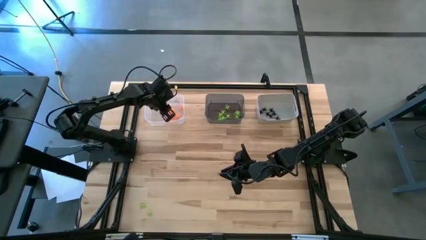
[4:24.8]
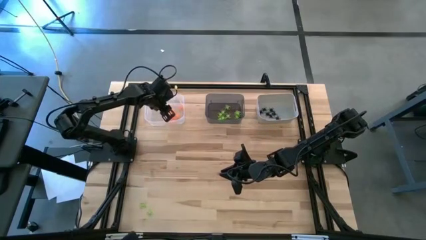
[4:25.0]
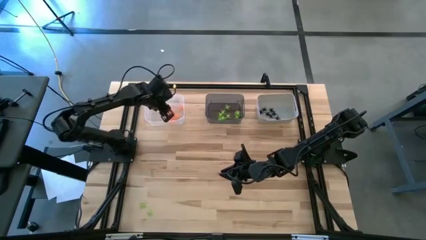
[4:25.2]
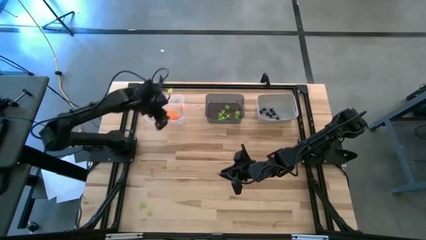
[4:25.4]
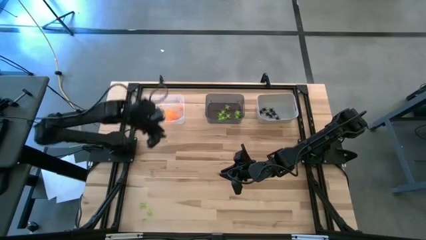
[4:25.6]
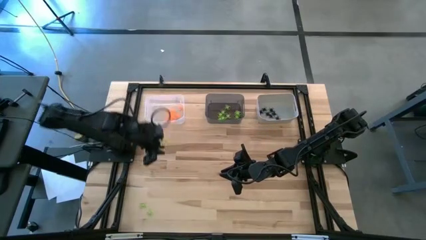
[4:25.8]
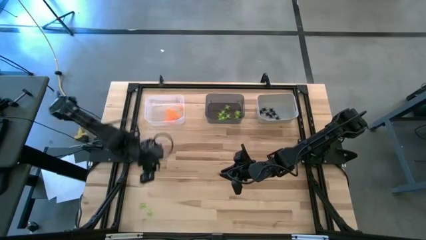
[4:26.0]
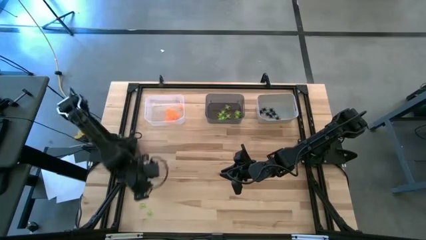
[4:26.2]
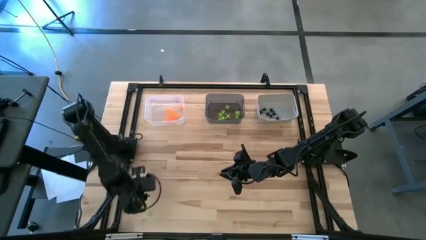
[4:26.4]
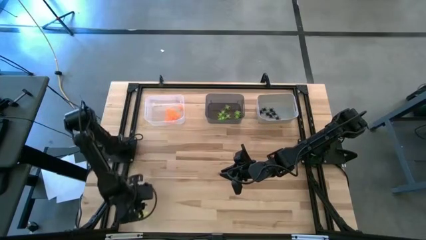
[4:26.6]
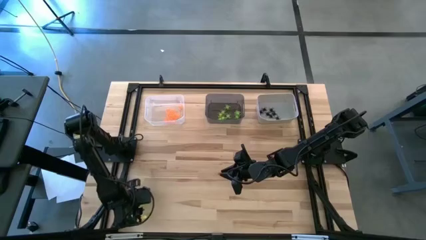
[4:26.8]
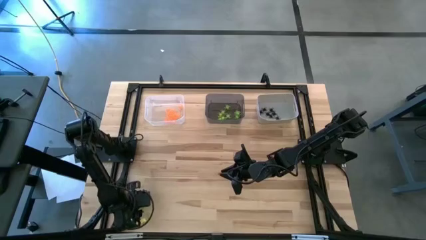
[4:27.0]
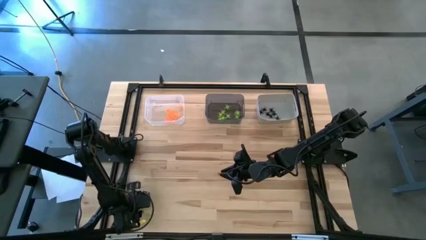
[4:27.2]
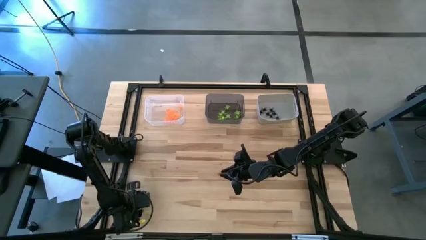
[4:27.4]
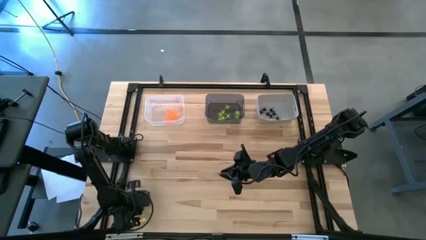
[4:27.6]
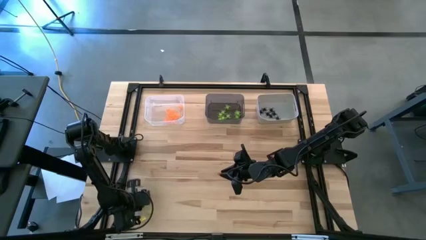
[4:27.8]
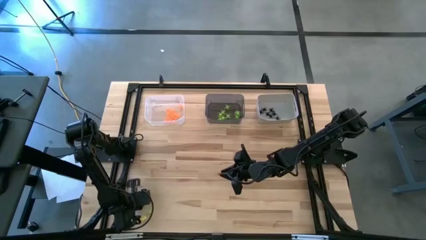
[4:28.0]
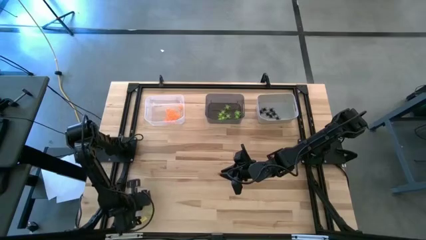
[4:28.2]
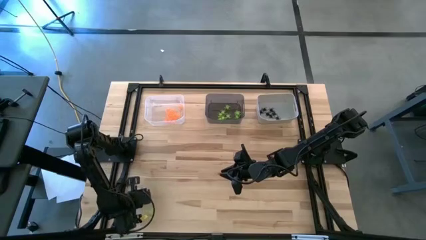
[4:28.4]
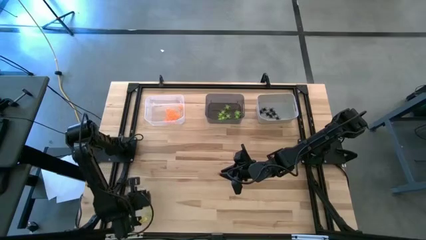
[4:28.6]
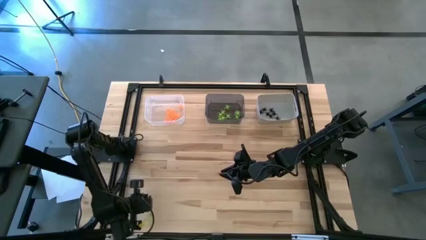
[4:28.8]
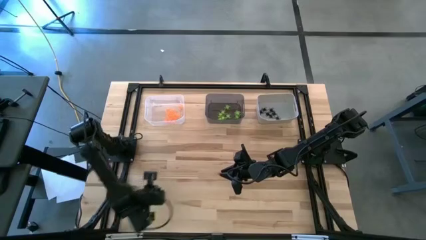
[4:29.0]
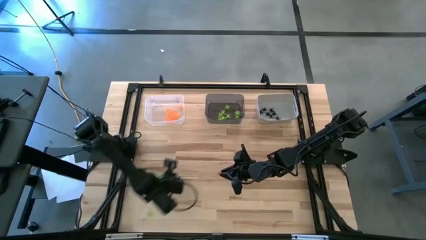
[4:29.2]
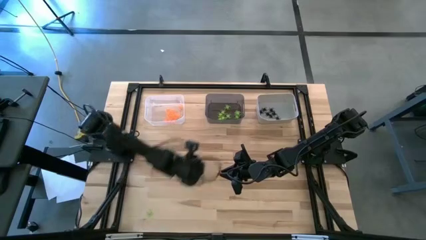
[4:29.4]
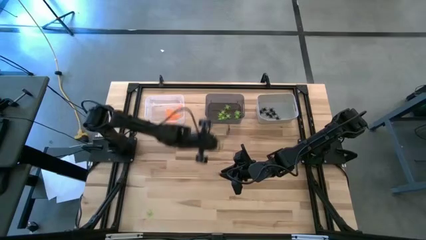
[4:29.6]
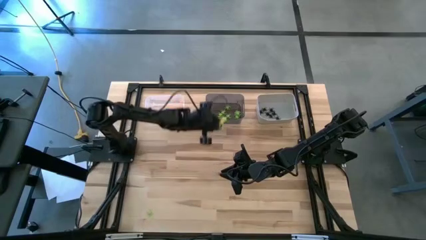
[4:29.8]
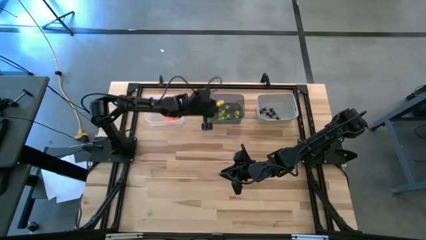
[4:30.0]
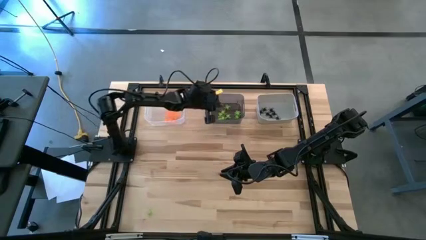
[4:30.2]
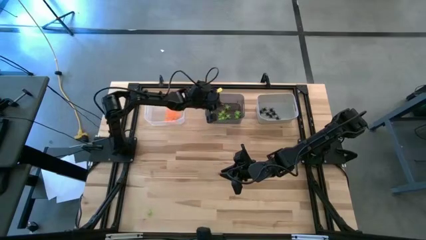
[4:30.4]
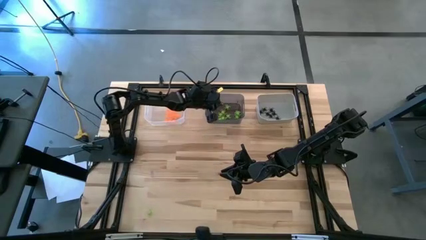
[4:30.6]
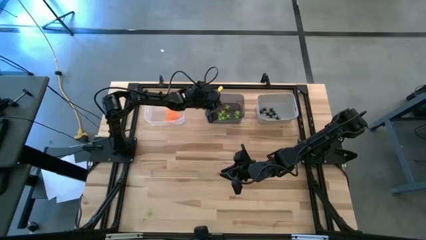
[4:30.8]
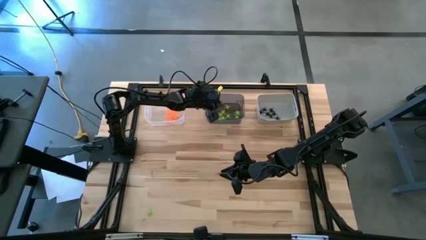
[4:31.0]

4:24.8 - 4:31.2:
Task: Sort Halloween decoration
Put the green spider toy into the black bin

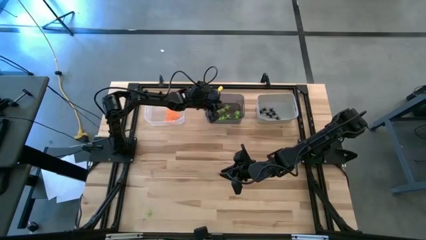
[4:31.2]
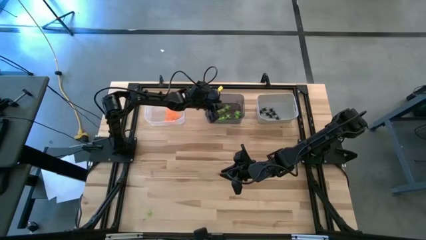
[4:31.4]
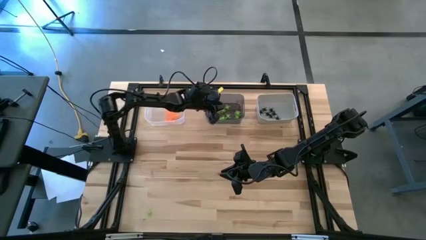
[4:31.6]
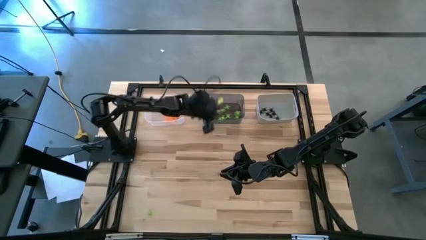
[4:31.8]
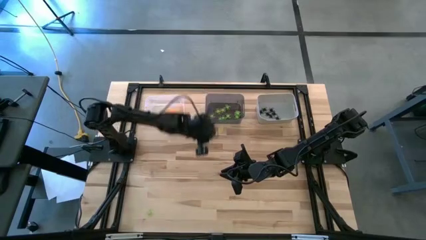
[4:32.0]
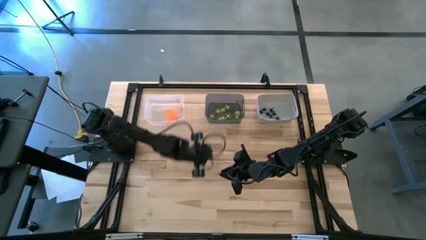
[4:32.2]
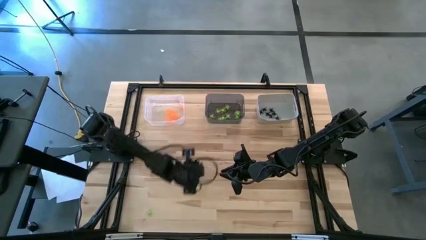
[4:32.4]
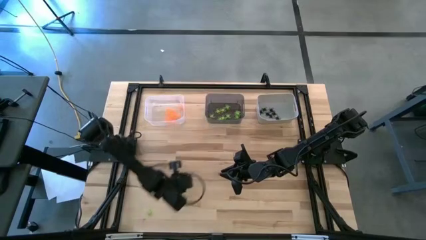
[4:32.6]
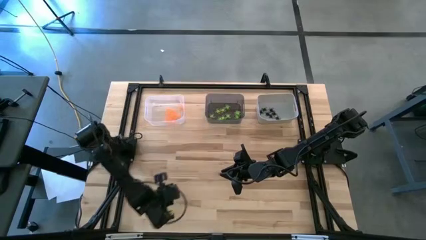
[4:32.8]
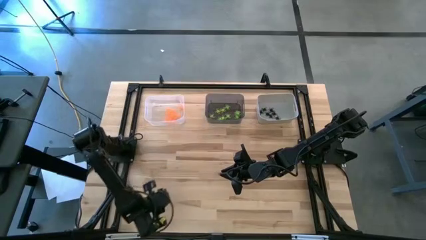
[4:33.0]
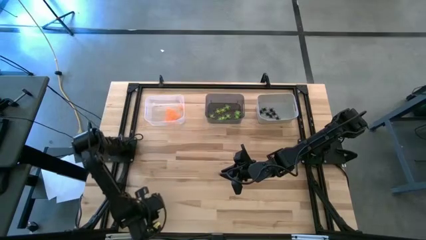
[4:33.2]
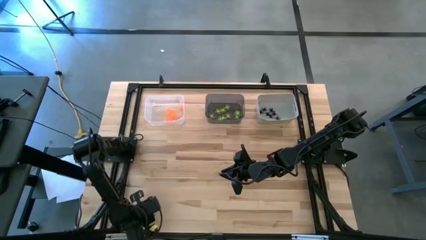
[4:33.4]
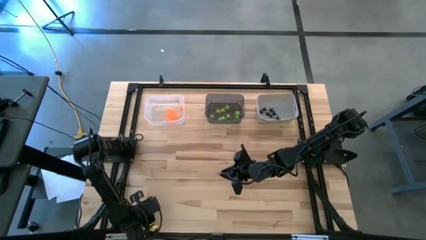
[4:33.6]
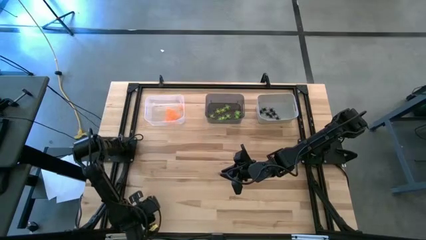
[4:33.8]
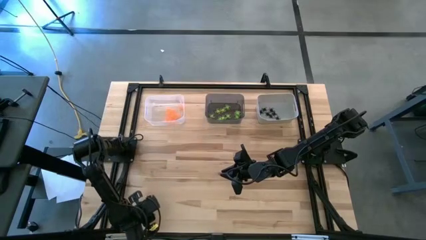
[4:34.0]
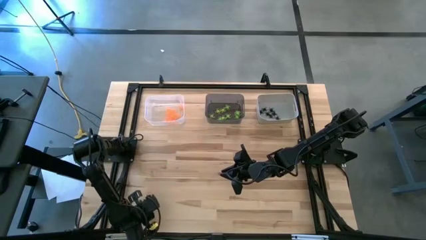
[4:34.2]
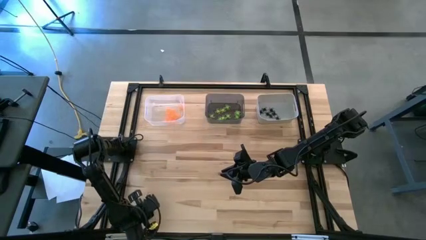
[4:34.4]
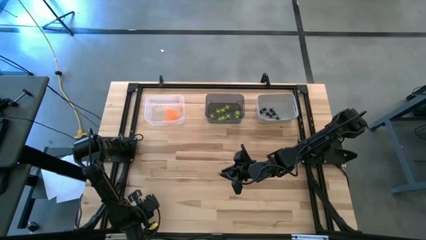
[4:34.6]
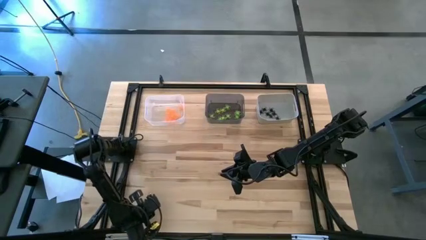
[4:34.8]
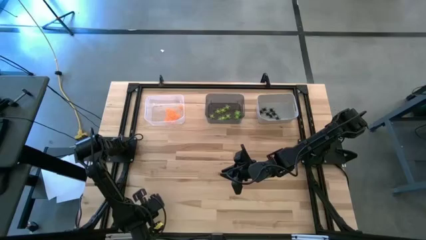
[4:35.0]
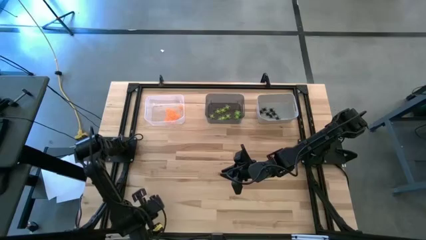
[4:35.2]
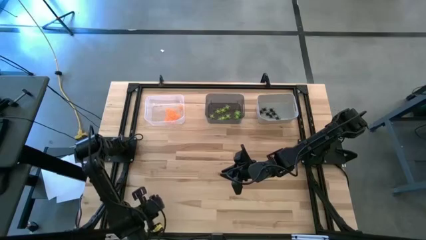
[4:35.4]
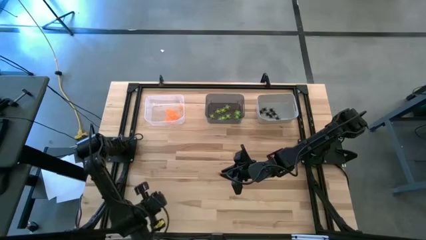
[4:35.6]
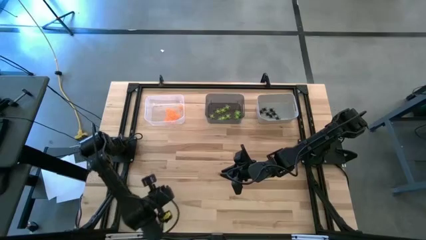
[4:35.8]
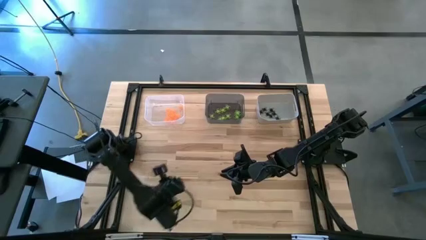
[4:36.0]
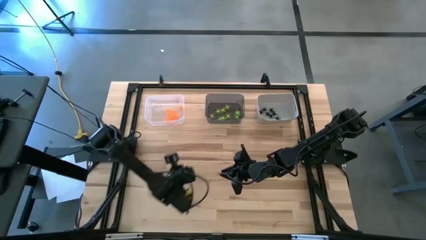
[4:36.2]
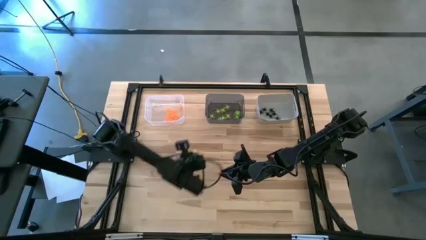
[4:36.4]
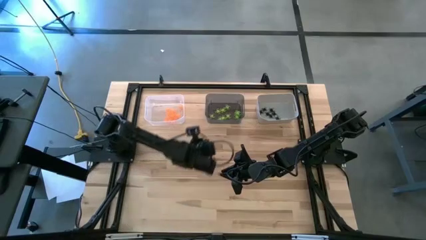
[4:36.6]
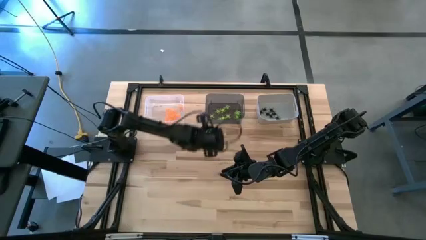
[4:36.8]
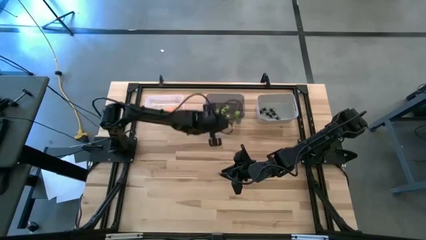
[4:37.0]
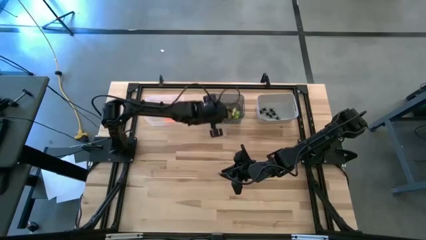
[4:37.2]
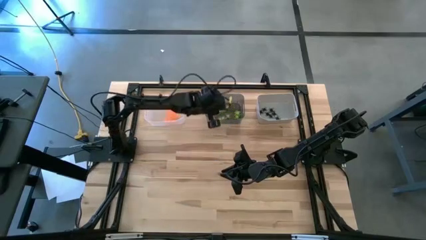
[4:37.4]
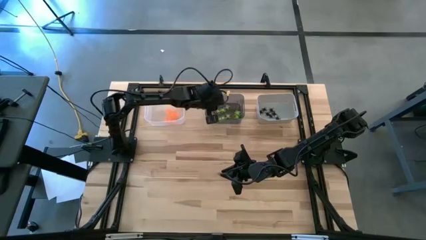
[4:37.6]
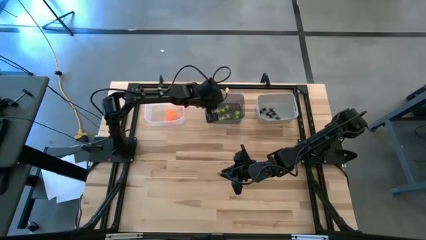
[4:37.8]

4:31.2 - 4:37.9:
Put the green spider toy into the black bin

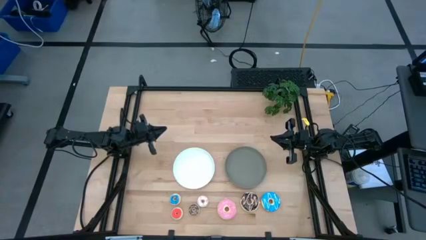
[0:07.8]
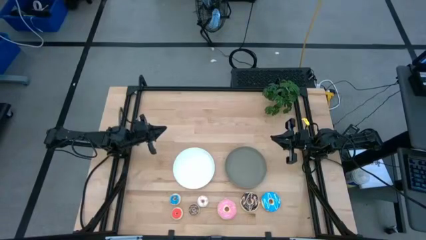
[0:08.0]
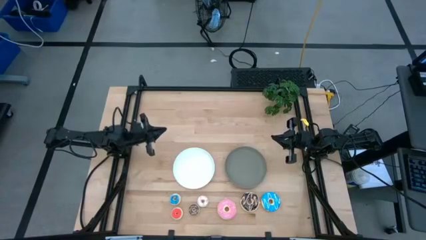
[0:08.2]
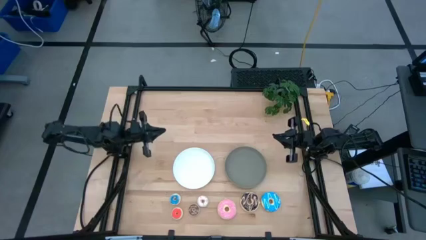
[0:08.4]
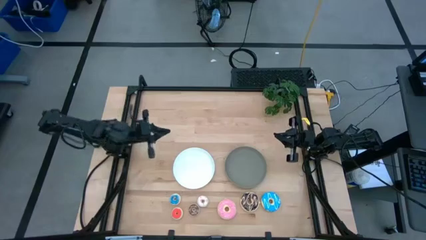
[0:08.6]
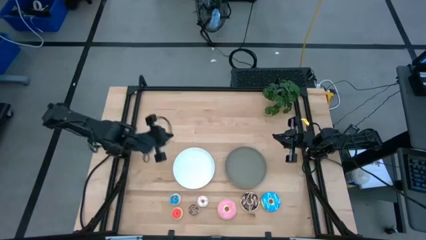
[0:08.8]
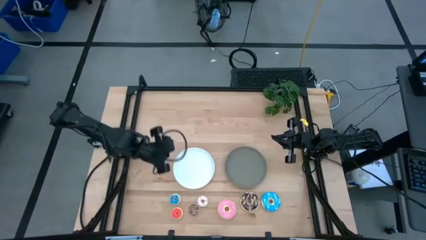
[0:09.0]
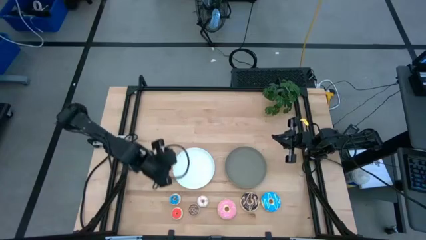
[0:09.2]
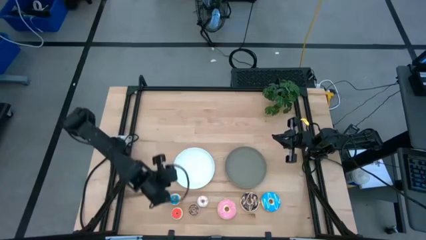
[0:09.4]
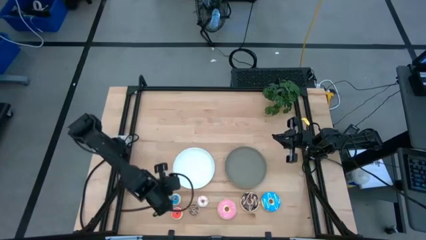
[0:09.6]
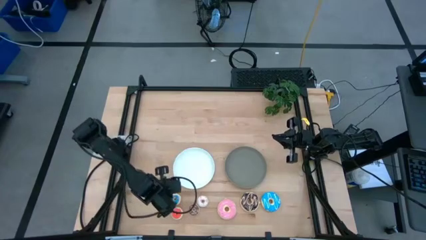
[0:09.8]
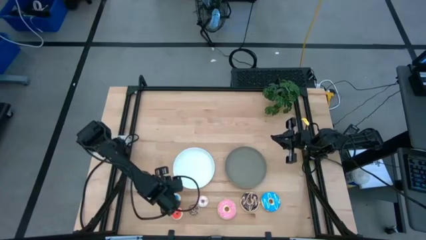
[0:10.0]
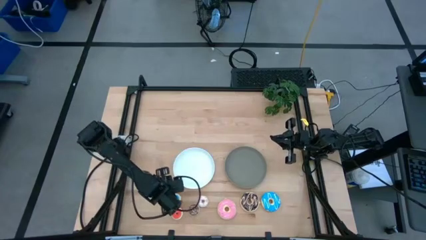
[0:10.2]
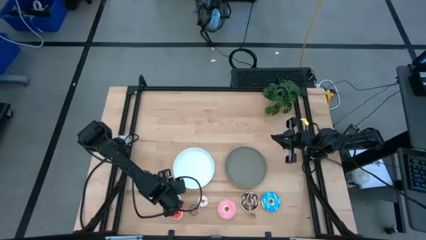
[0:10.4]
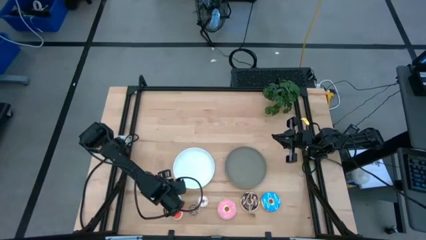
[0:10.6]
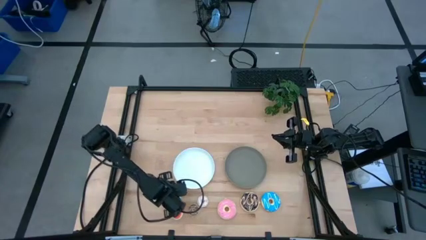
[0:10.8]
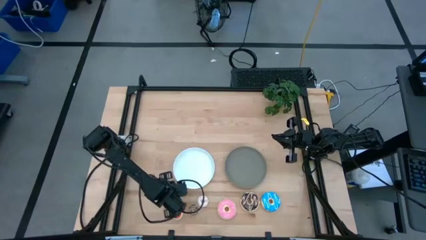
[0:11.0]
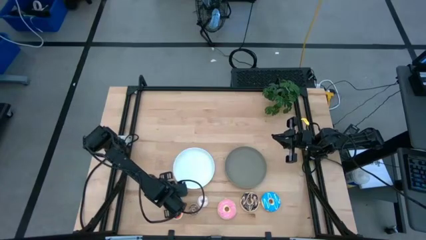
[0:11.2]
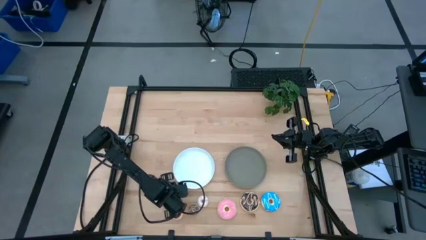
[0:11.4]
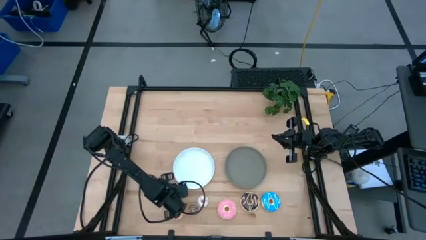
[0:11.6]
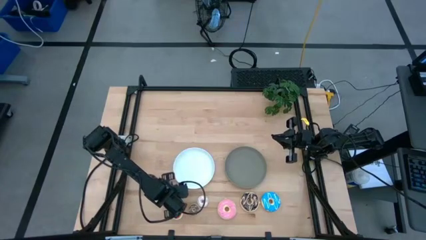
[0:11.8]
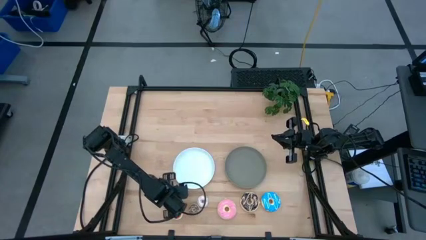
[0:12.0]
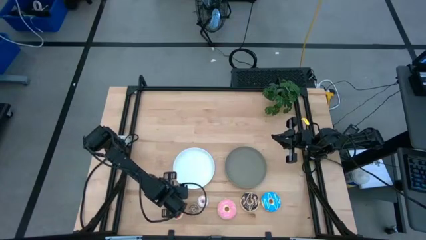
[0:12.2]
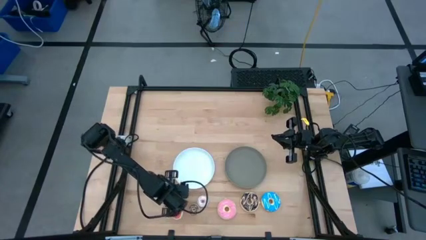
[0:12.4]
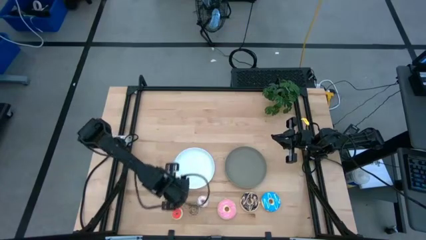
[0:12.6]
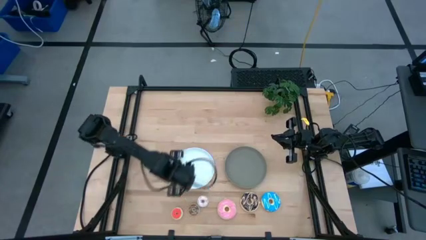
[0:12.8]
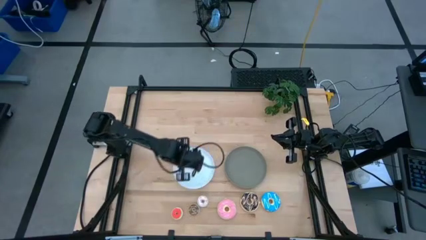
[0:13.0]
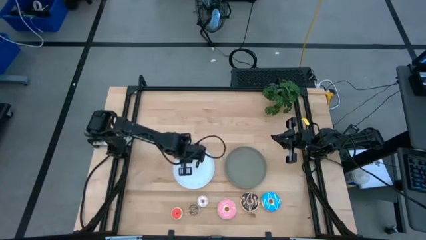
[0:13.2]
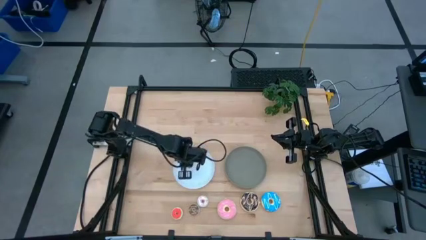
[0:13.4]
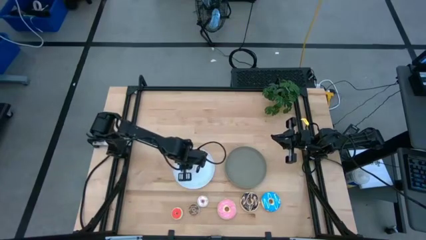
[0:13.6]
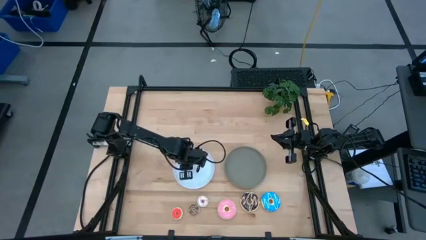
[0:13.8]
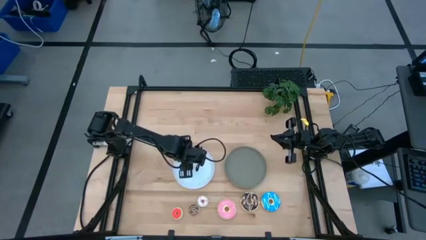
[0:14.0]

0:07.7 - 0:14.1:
Task: Pick & Place donuts
Put the small blue donut on the white plate
